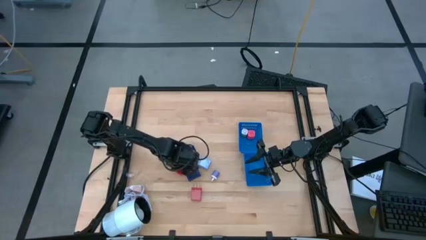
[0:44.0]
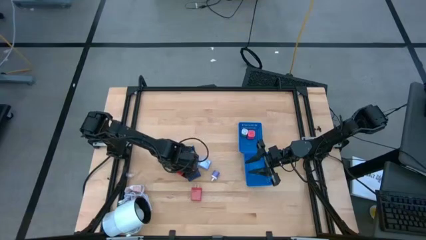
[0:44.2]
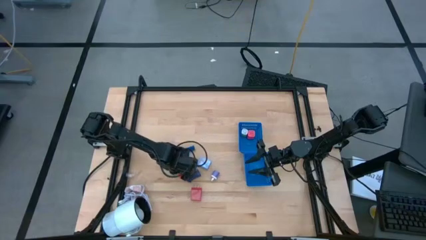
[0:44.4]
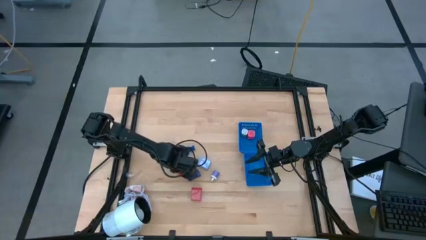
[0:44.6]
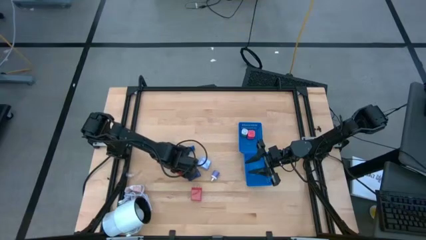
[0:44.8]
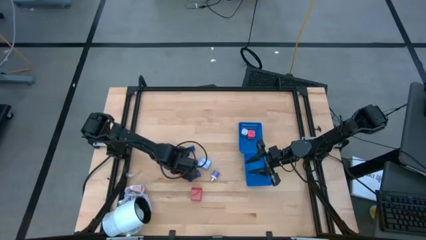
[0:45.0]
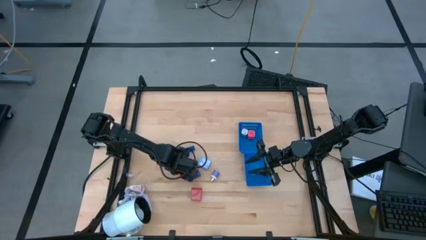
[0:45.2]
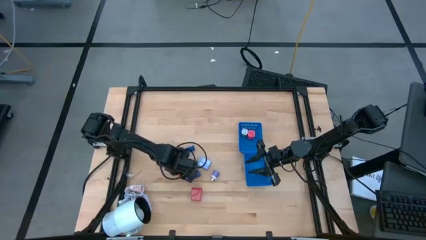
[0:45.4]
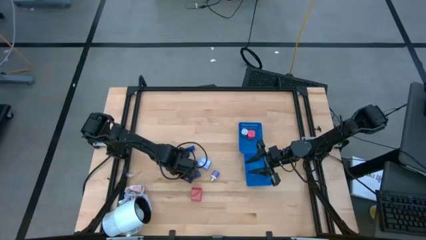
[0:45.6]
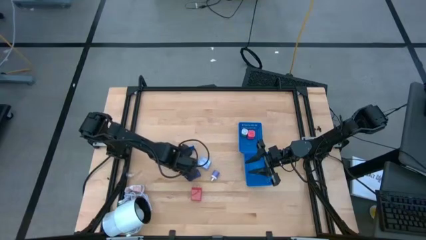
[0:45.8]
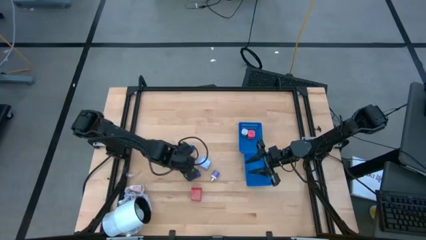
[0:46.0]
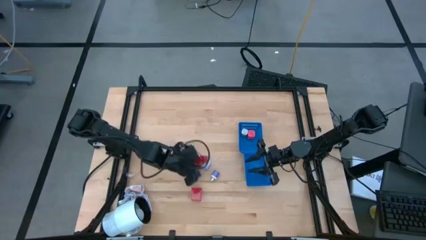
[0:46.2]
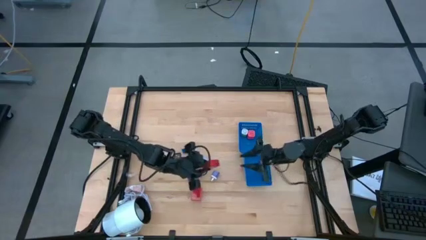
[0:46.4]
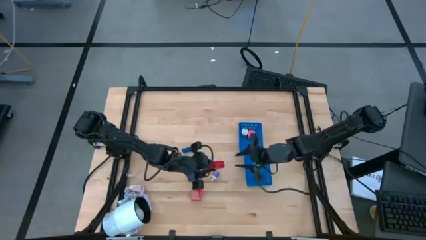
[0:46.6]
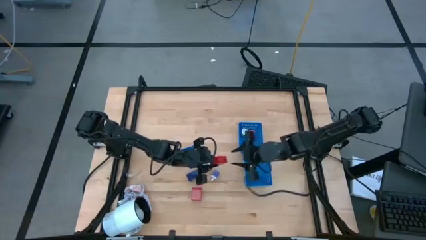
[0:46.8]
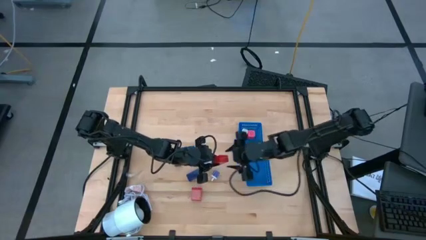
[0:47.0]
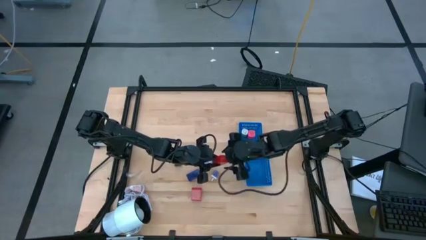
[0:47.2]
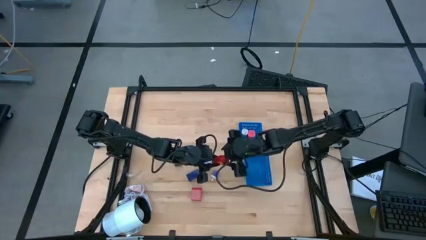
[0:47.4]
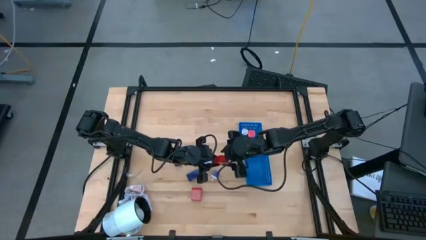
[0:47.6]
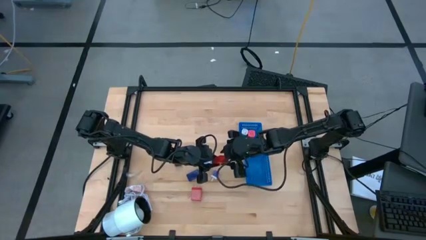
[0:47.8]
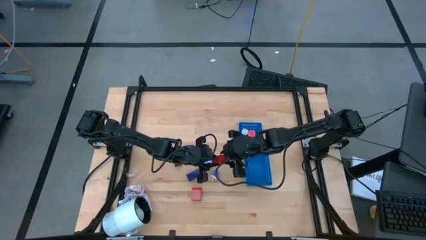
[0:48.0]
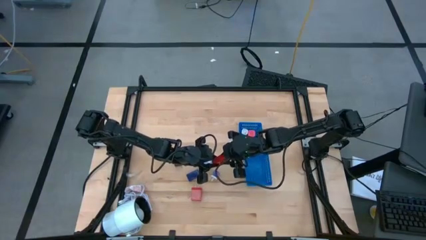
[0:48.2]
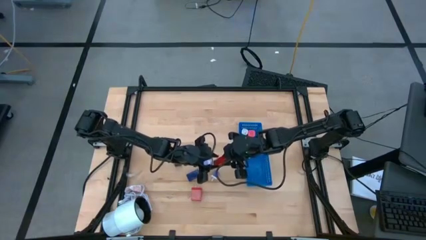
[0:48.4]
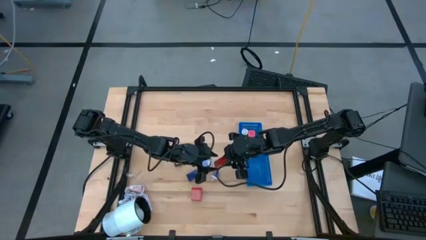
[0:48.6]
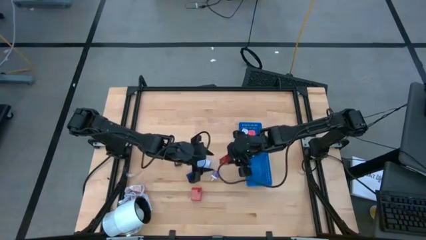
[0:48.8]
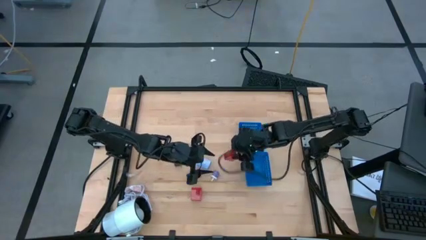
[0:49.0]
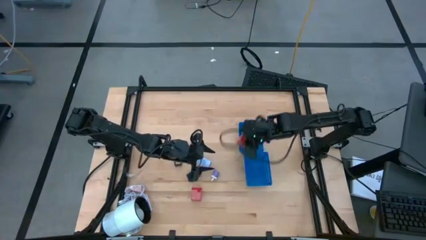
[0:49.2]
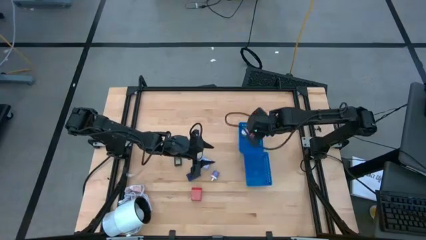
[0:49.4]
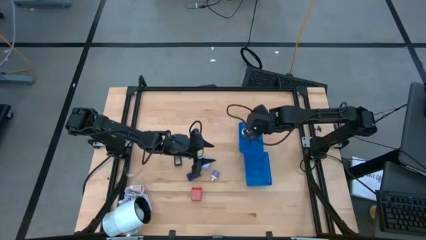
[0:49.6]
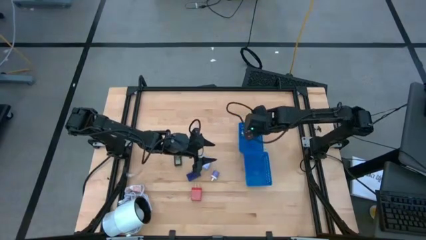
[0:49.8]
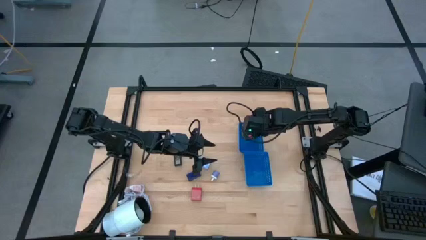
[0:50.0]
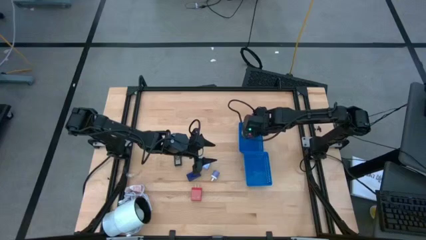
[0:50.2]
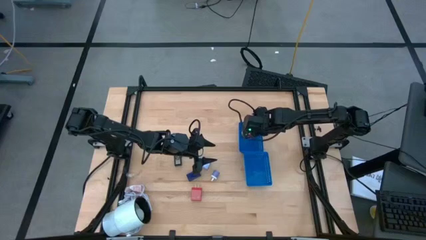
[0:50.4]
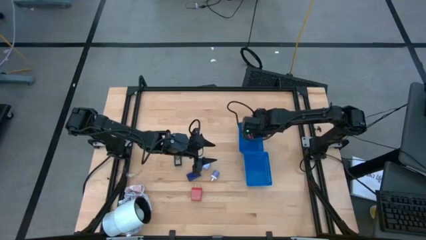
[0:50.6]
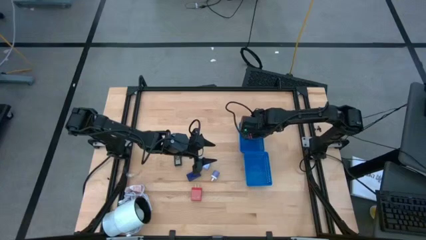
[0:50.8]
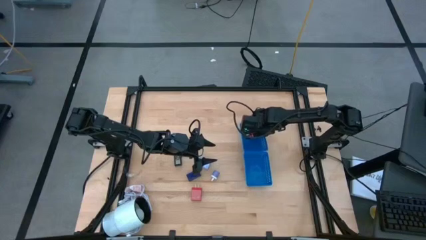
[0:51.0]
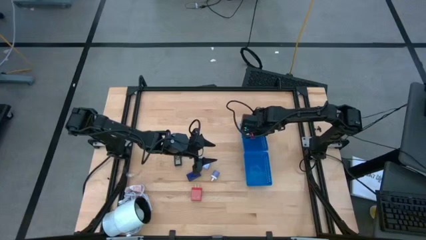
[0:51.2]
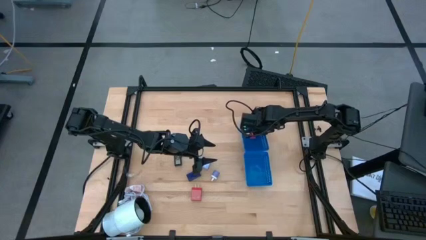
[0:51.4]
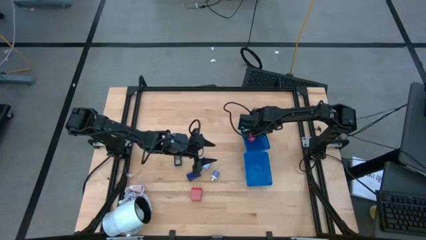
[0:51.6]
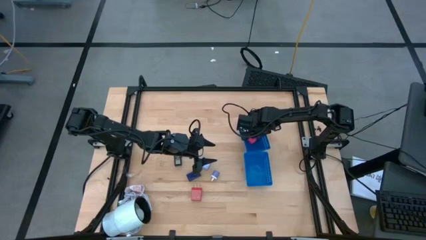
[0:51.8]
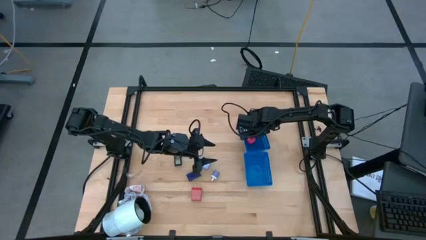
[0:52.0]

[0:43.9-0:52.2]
Task: Pick & Place Office items
Put the red charger adapter into the top blue bin

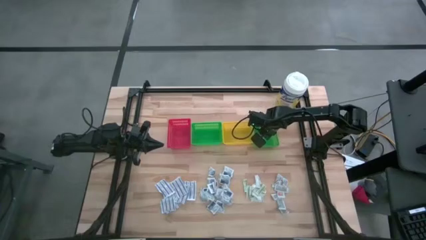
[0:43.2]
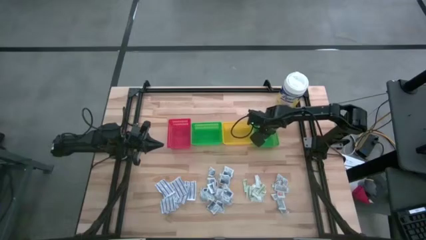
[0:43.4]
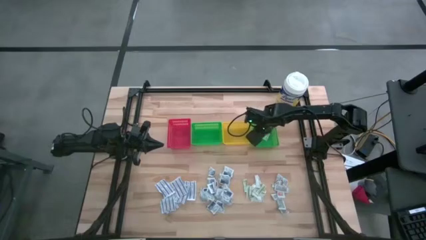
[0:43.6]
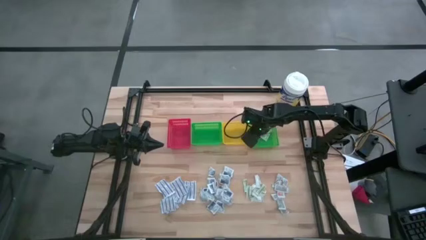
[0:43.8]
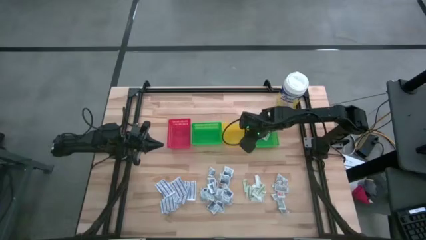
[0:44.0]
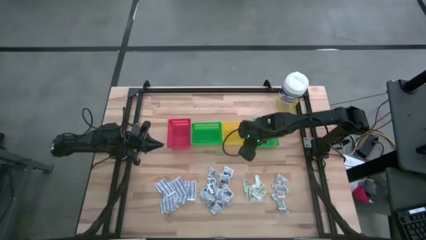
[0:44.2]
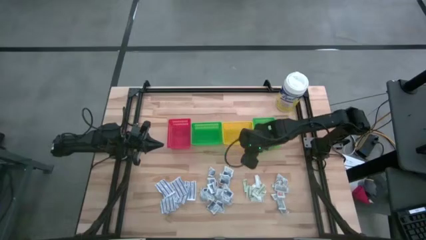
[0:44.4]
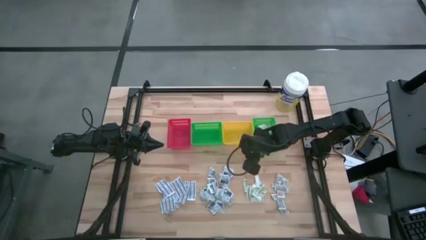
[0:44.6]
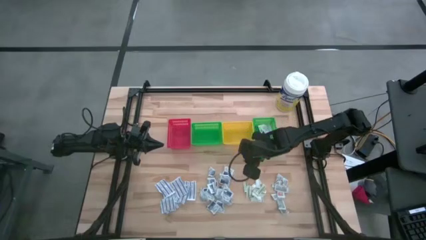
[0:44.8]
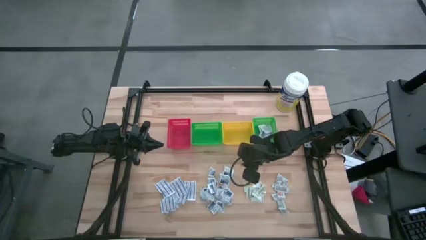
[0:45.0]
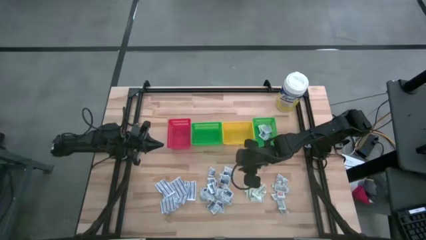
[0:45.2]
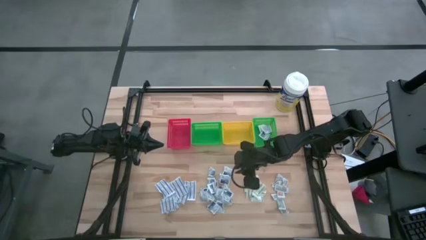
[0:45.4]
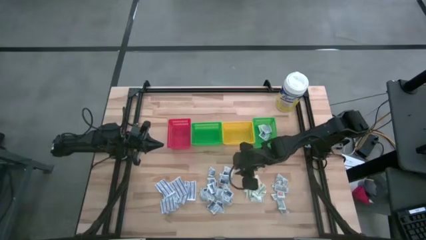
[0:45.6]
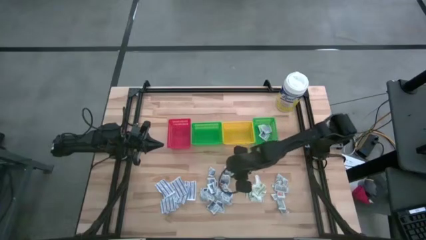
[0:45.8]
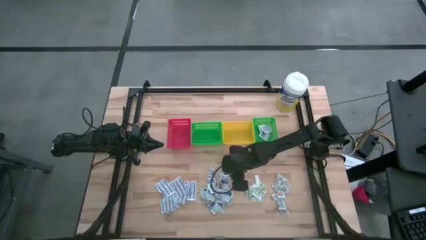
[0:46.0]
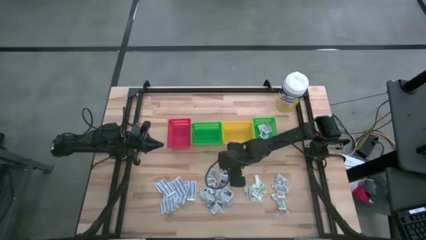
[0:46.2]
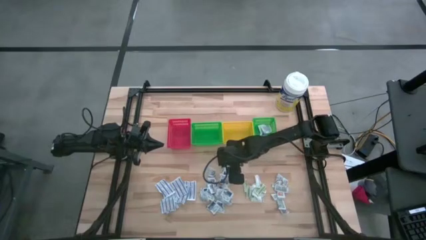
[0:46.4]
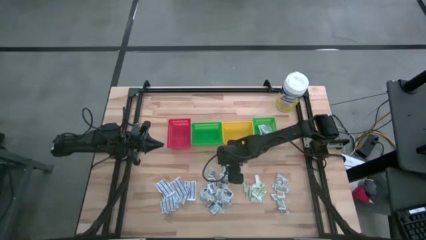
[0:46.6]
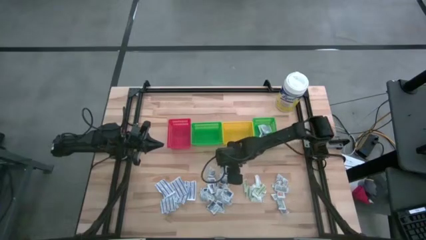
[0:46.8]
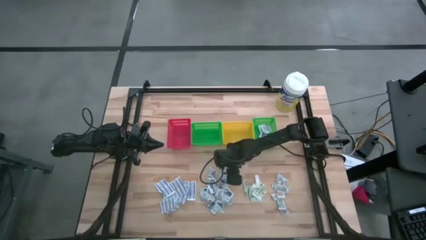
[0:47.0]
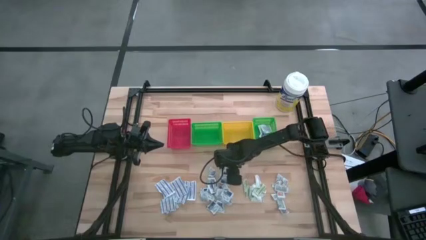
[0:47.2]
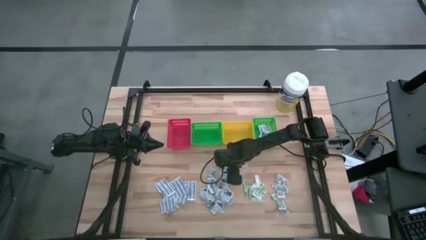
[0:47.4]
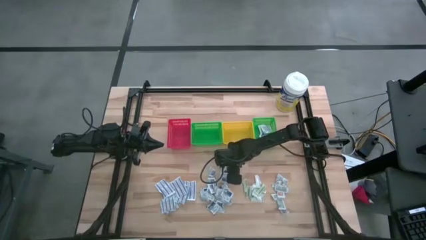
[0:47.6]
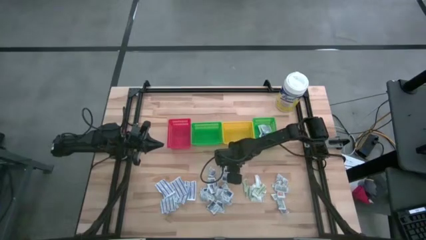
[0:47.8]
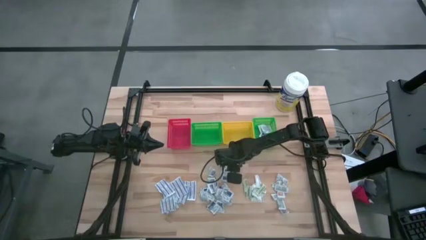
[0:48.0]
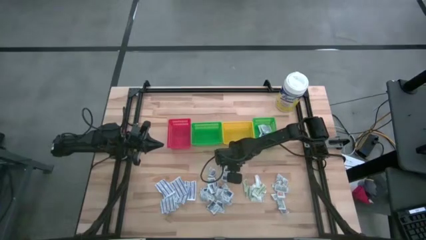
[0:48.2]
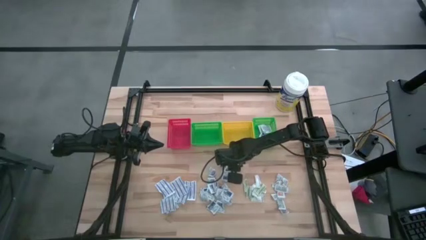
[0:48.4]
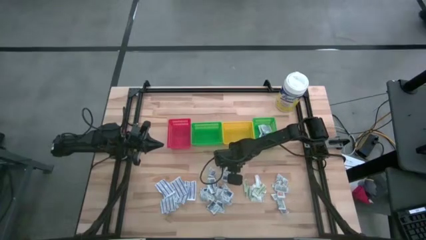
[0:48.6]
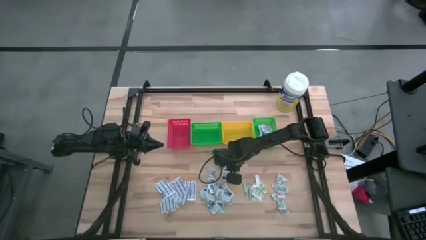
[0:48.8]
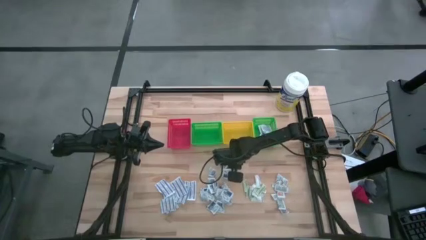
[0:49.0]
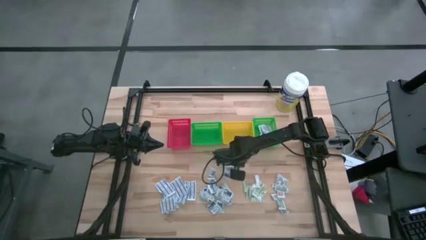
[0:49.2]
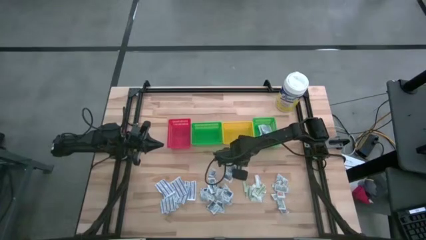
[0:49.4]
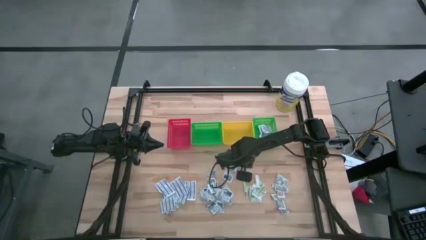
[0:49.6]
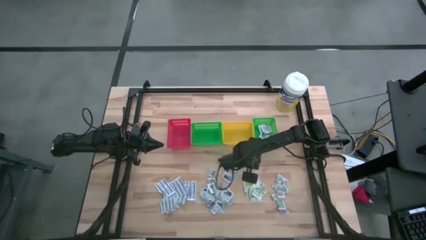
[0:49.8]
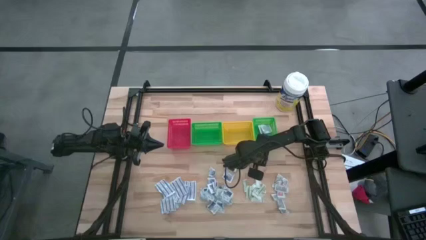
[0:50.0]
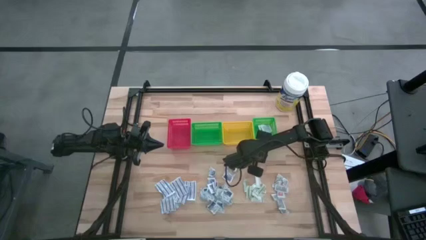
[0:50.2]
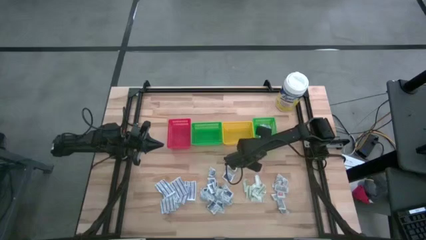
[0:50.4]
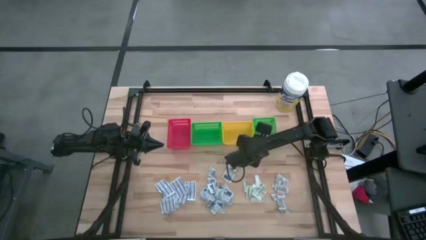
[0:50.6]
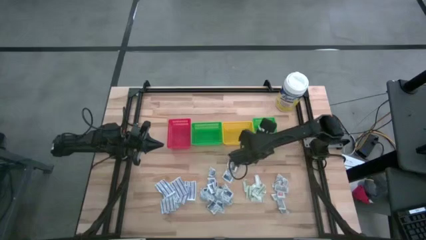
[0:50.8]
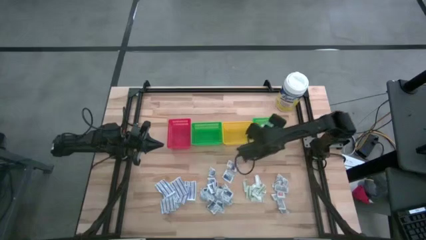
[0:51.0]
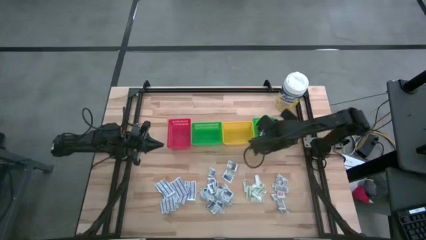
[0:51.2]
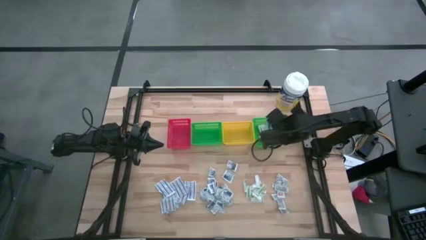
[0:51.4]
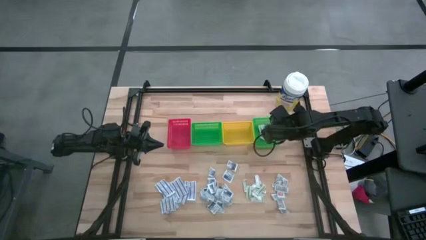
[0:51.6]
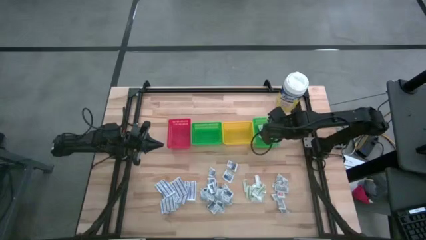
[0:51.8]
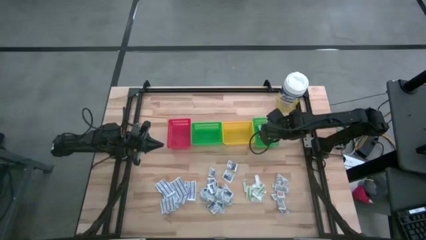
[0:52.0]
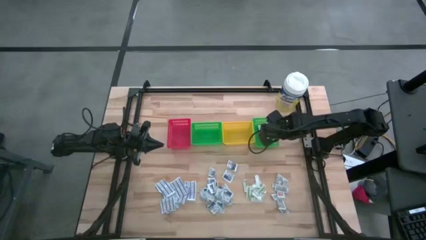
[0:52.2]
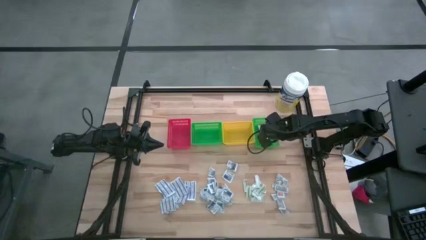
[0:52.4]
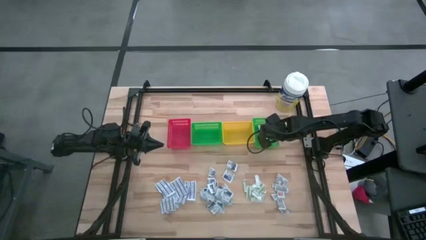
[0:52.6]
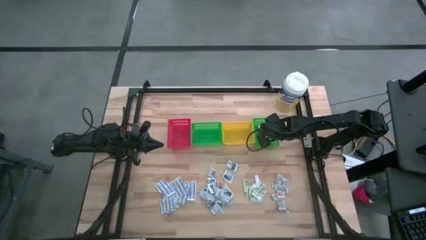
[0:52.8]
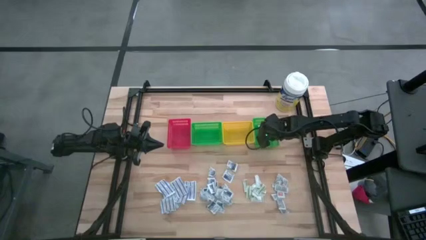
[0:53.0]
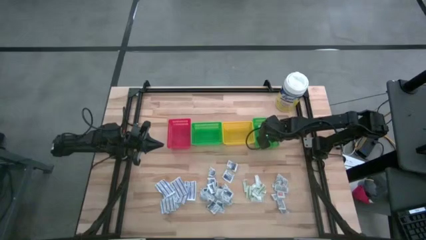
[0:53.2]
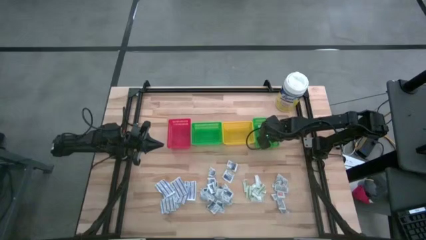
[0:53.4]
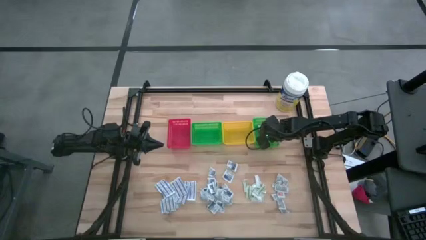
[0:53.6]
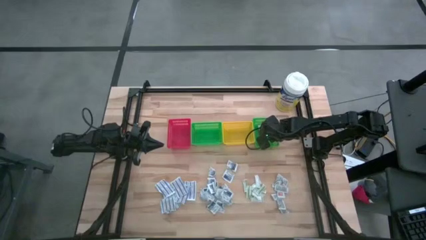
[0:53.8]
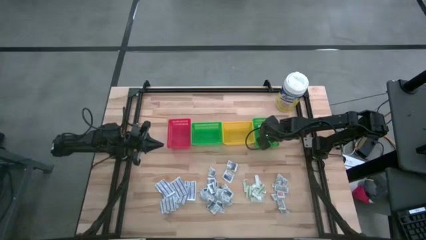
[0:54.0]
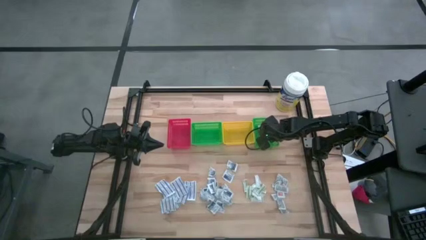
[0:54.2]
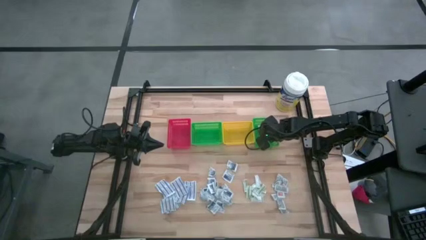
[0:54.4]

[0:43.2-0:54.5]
Task: Pick & Place First Aid Supplies
Put the blue alcohol pad into the right green bin
